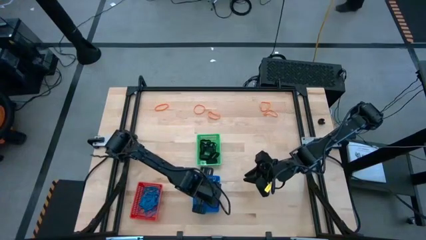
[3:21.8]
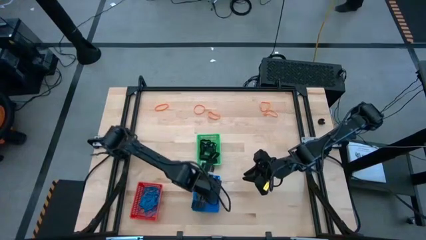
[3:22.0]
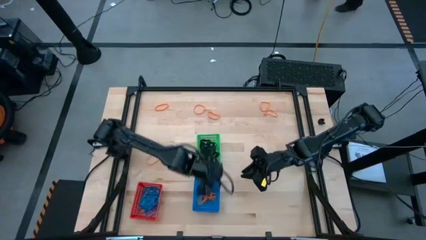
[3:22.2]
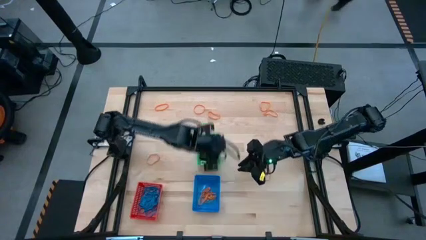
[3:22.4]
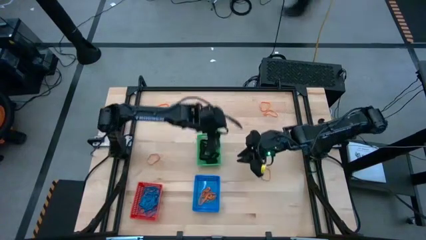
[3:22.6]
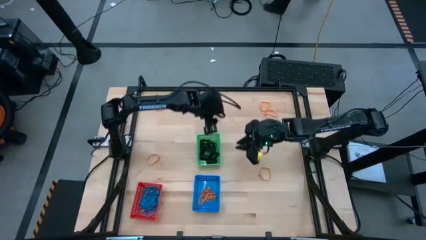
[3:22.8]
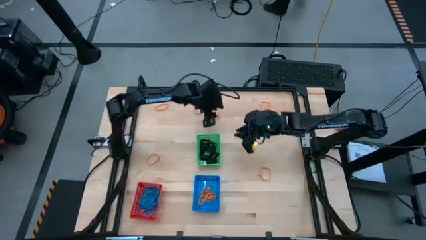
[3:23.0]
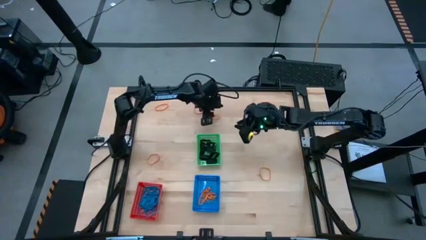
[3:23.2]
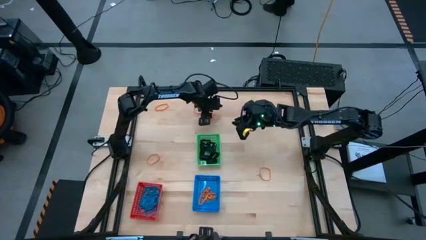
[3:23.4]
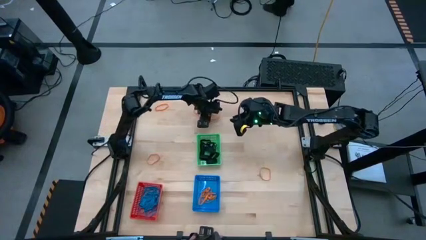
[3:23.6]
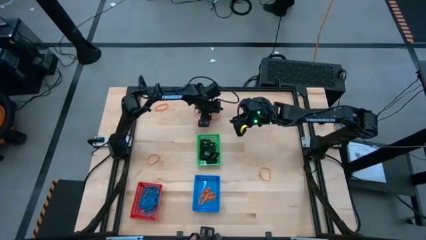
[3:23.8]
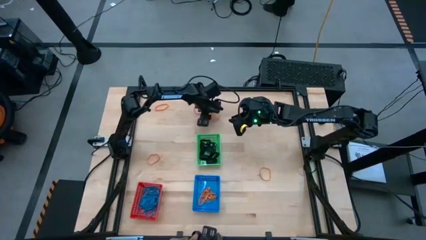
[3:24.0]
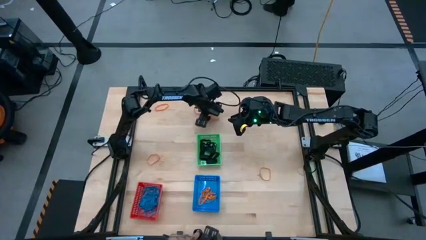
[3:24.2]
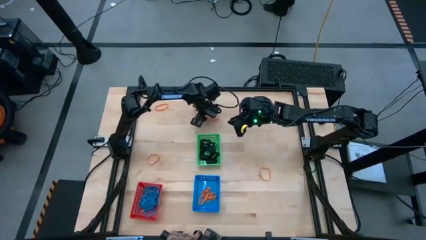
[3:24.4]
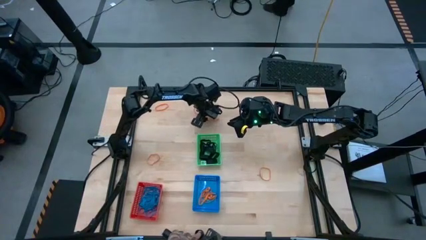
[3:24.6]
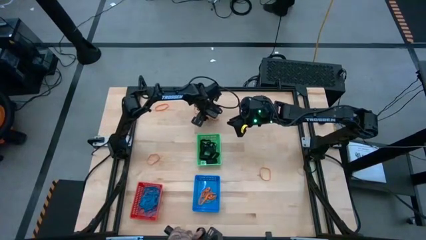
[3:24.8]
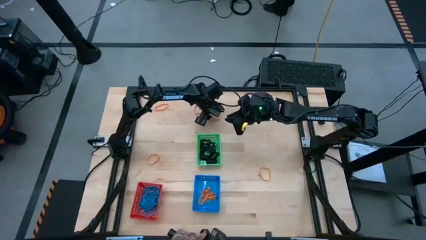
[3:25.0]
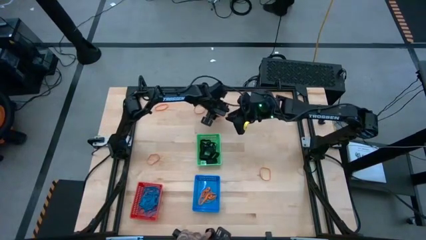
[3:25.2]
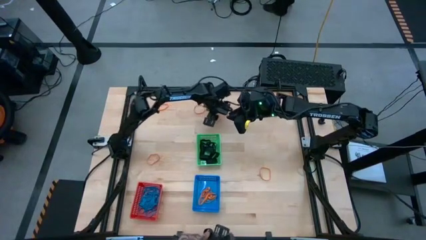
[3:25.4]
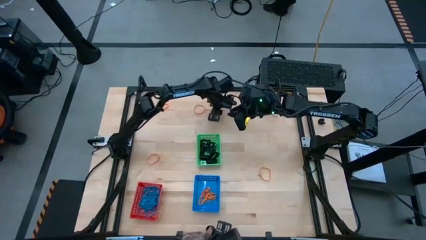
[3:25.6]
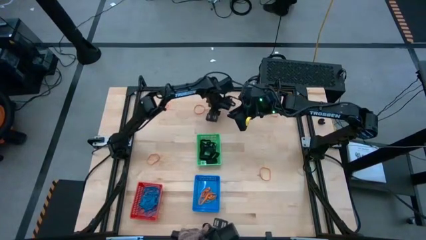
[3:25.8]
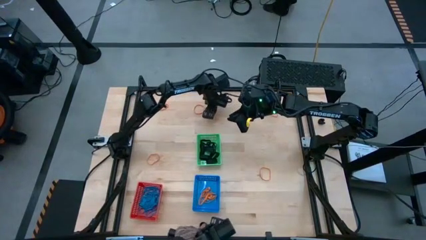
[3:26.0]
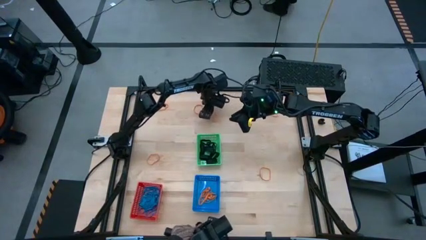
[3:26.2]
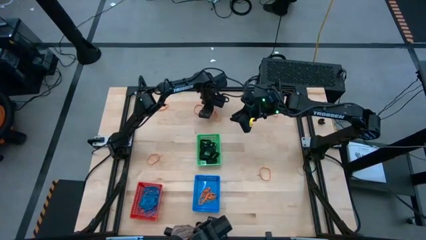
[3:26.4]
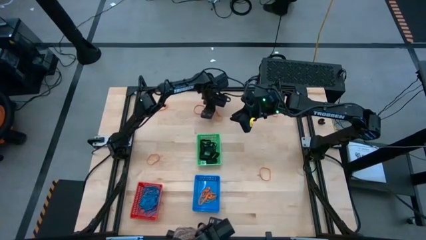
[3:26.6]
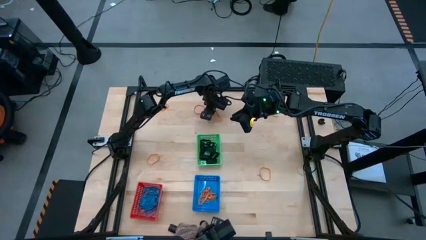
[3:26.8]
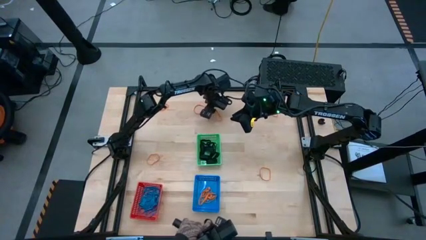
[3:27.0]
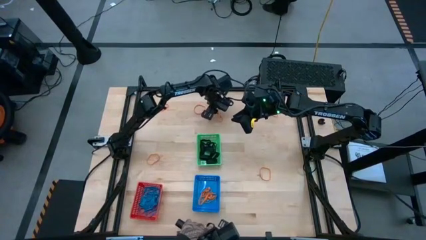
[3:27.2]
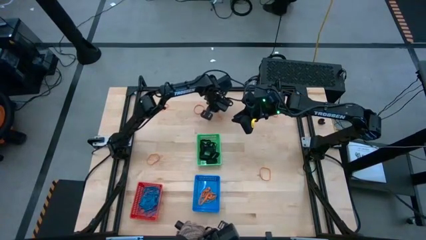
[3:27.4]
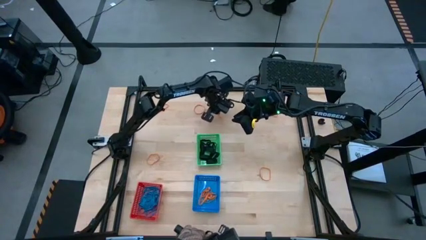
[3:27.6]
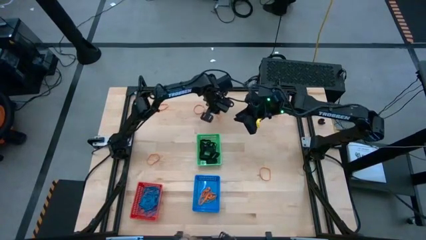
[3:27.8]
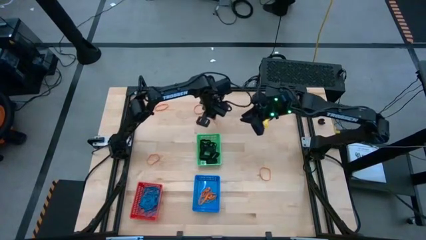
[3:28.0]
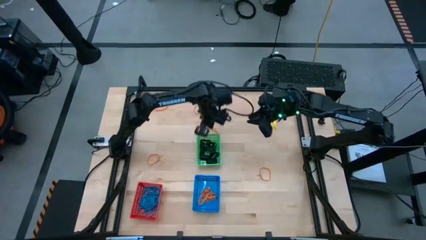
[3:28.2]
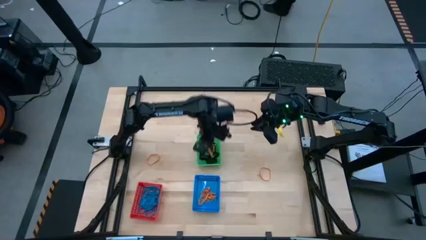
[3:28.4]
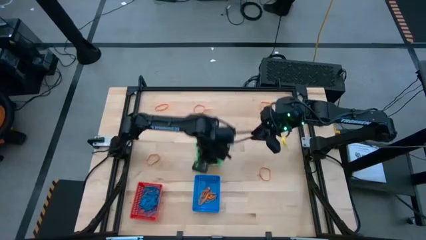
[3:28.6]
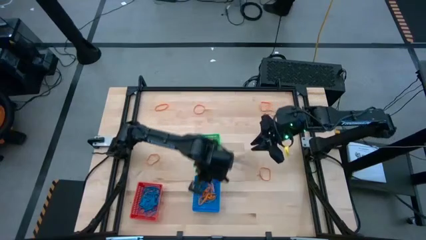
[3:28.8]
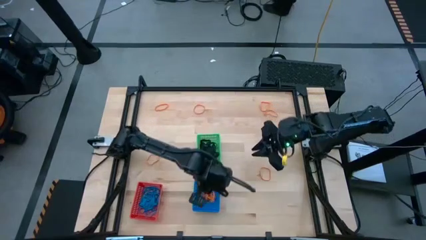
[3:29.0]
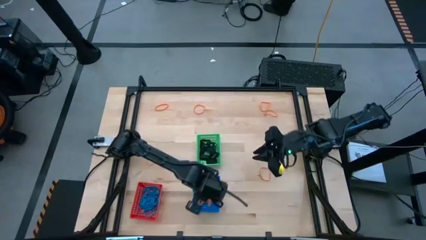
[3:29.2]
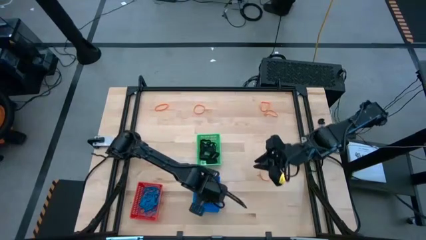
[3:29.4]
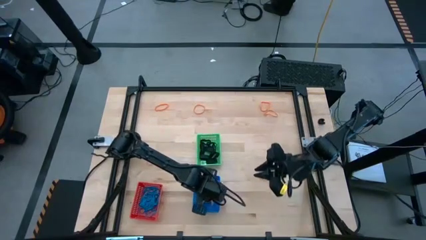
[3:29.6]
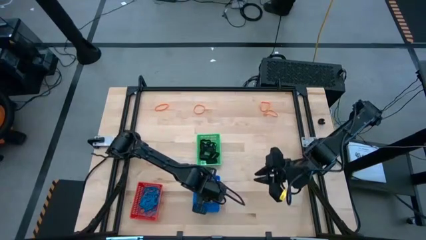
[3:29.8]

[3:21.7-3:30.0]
Task: Sort rubber bands into baskets
Put the orange rubberband into the blue bin

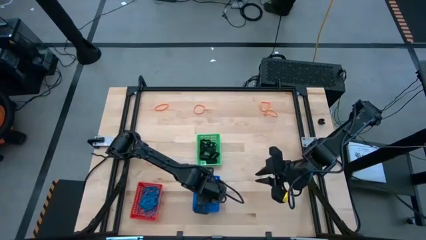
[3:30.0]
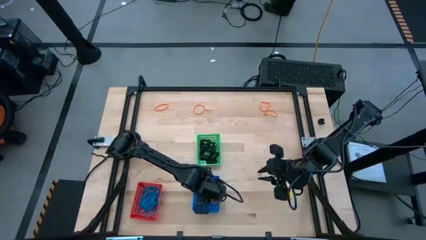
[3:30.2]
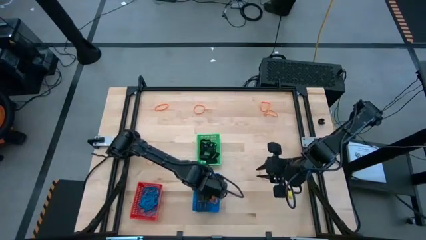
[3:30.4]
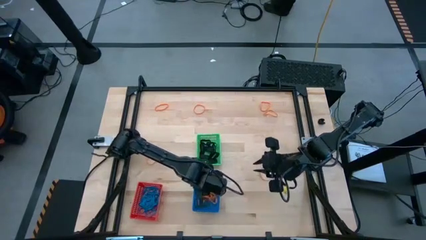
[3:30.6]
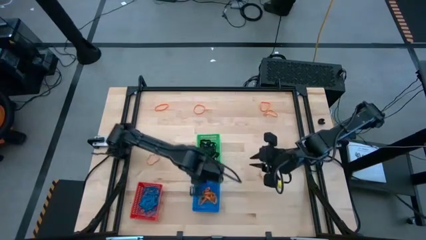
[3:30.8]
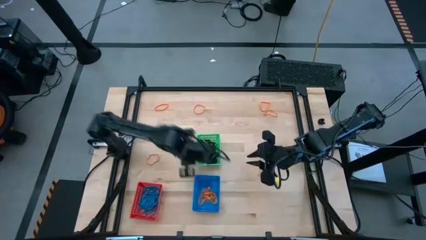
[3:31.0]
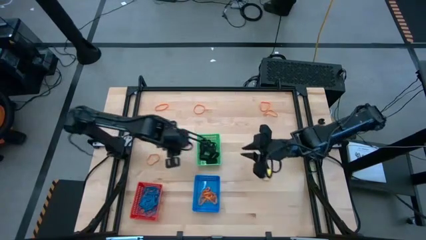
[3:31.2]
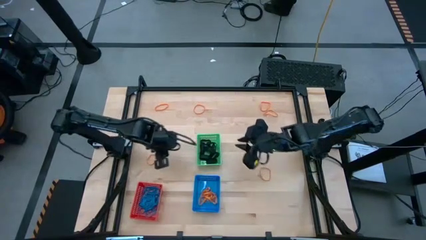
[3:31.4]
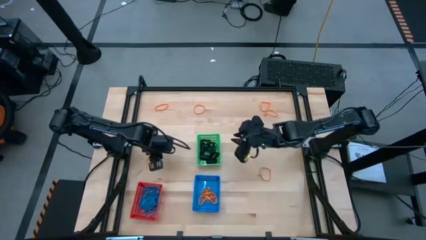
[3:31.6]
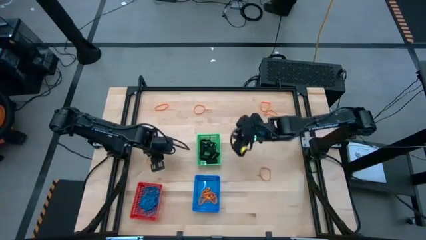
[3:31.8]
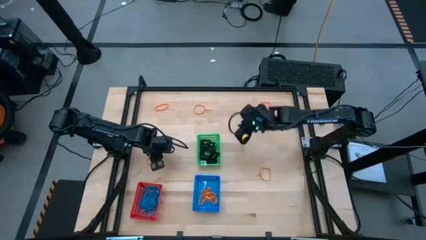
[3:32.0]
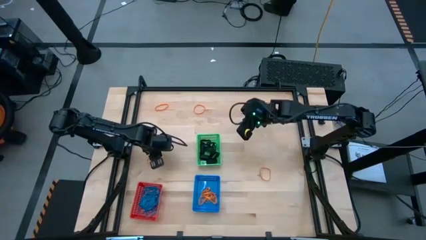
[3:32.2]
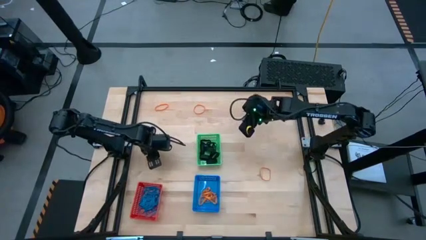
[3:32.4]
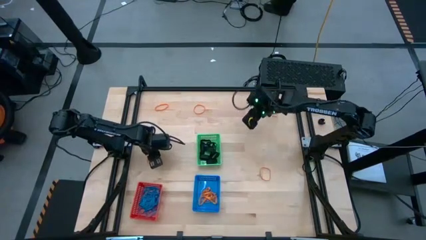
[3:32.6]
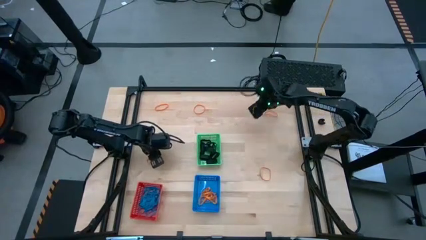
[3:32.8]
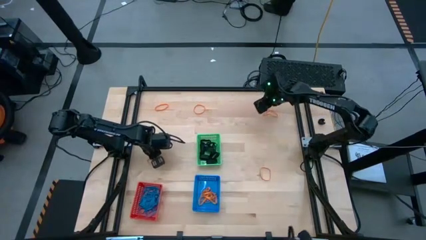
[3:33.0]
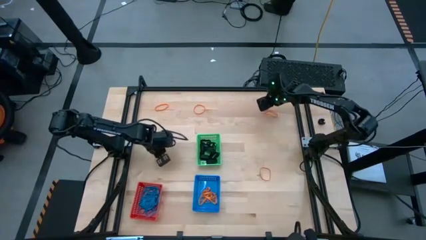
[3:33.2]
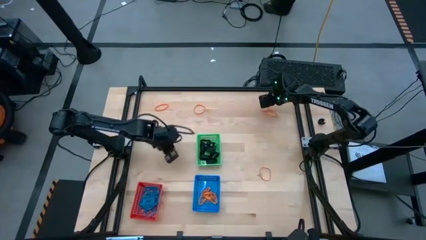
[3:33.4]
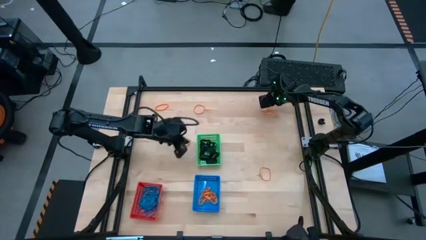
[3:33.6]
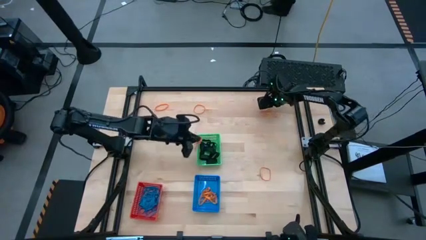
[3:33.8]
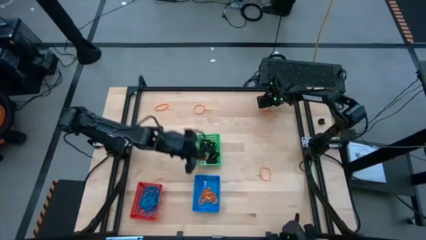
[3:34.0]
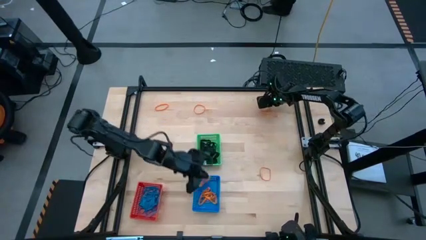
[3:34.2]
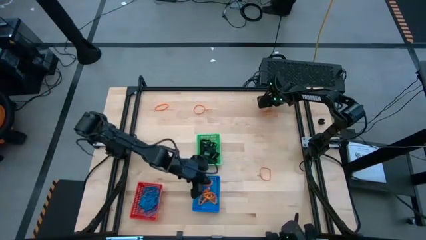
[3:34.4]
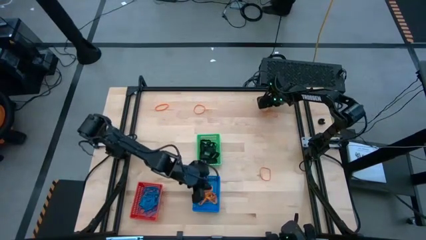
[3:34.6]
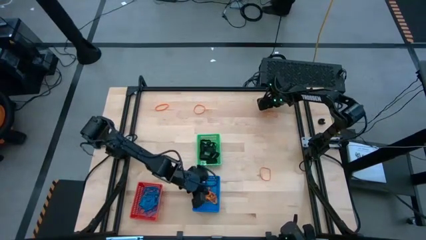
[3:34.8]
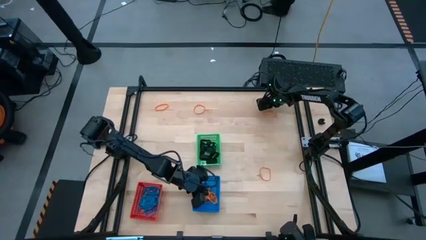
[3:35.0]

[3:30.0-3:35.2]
Put the orange rubberband into the blue bin

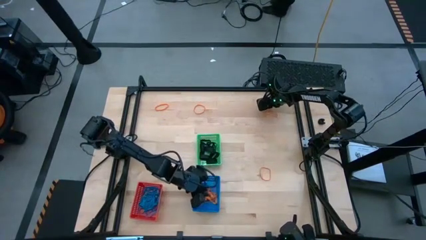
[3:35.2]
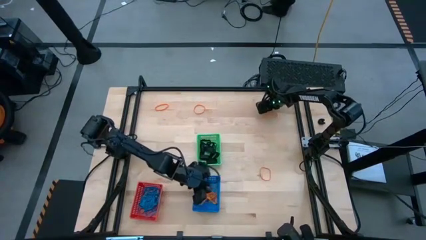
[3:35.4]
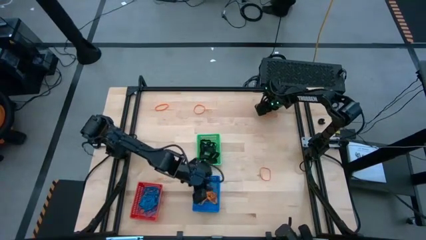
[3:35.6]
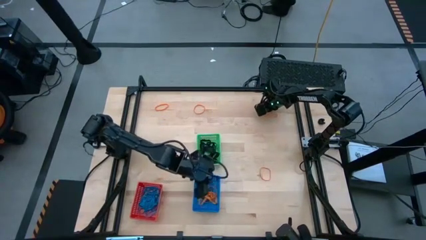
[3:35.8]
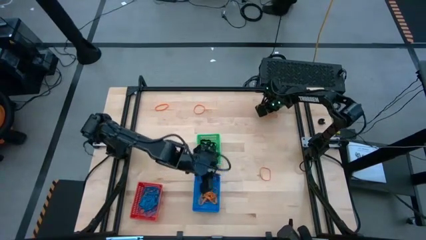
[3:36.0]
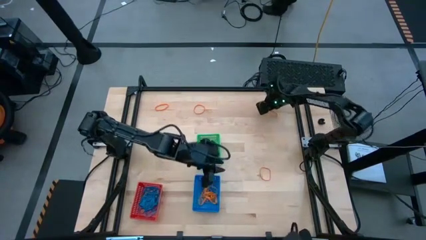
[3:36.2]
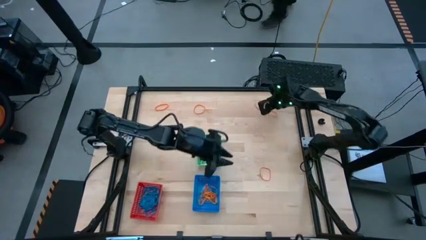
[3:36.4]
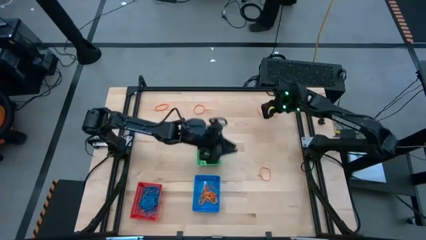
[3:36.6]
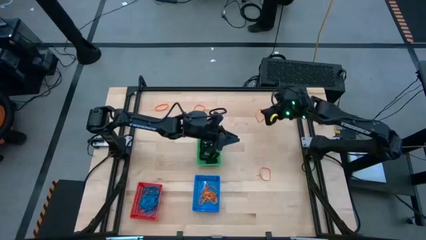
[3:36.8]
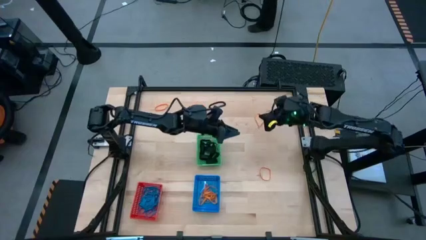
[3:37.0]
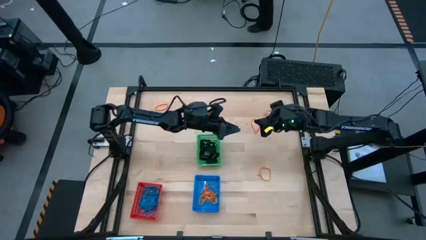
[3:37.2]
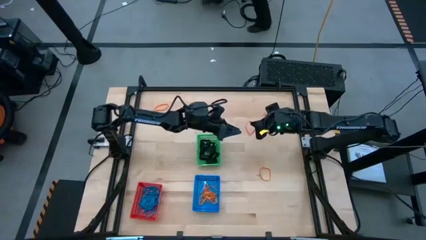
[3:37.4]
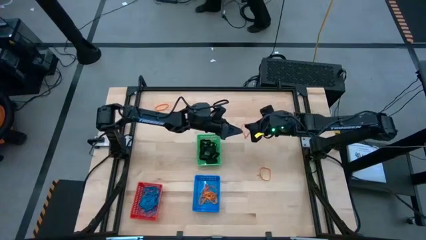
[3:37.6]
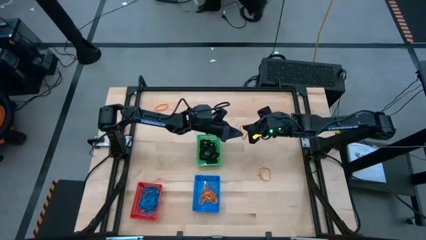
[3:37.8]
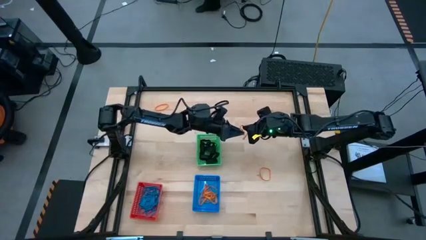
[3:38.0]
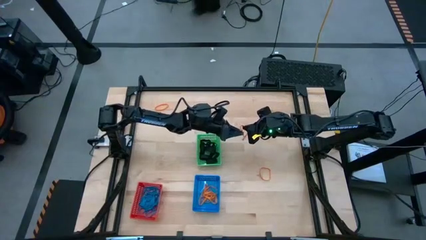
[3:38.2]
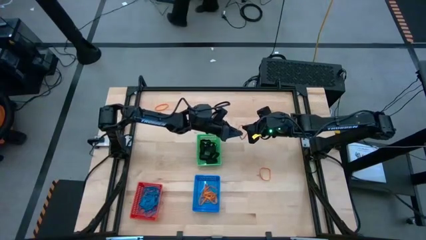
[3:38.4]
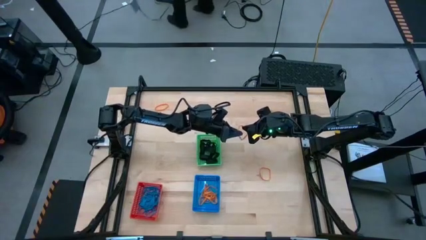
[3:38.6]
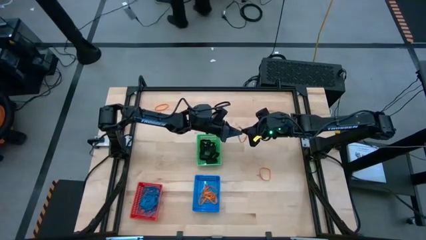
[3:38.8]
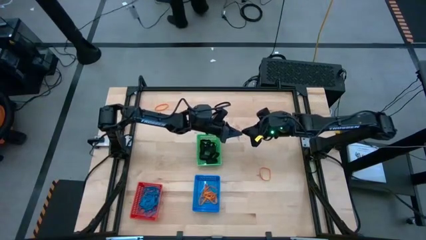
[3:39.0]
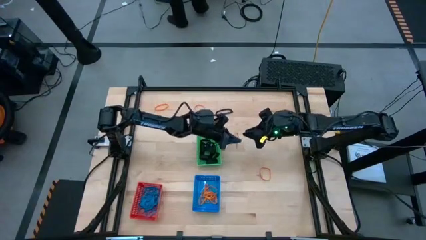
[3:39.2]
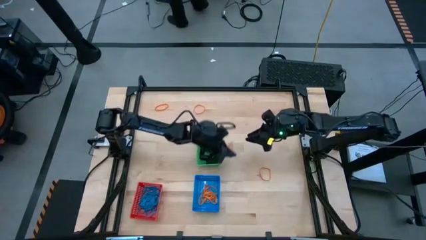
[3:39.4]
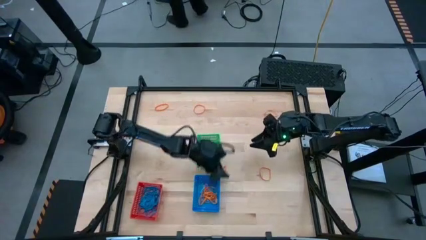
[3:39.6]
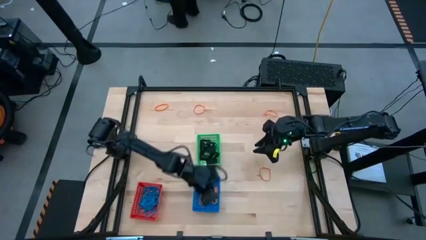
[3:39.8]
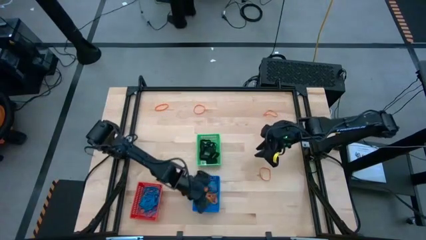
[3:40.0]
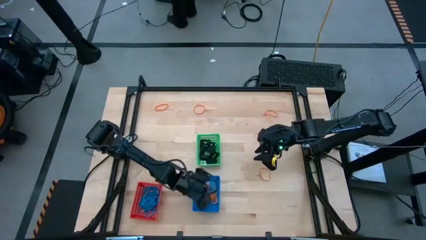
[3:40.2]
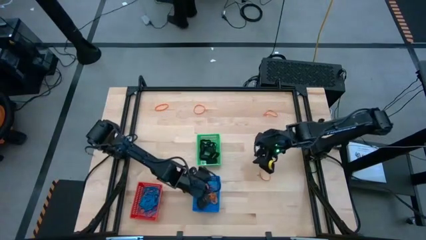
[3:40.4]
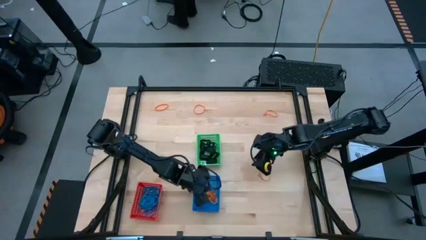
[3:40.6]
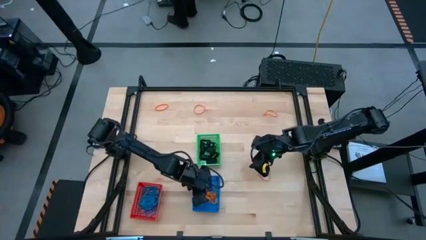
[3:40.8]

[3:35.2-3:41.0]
Put the orange rubberband into the blue bin
